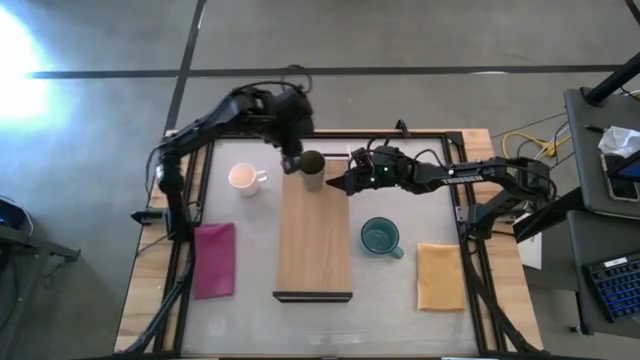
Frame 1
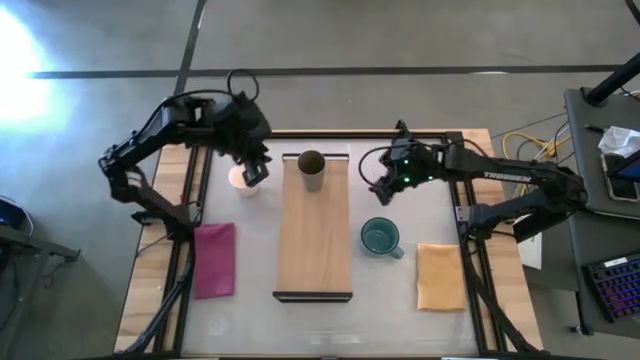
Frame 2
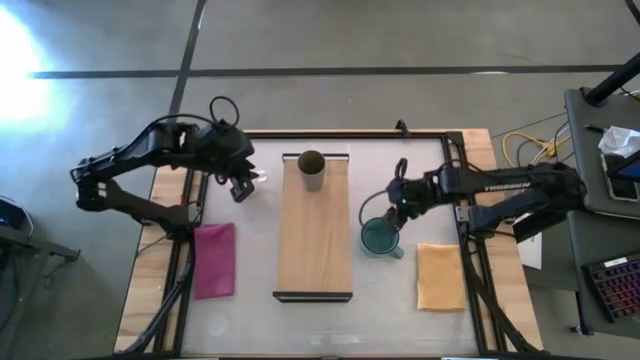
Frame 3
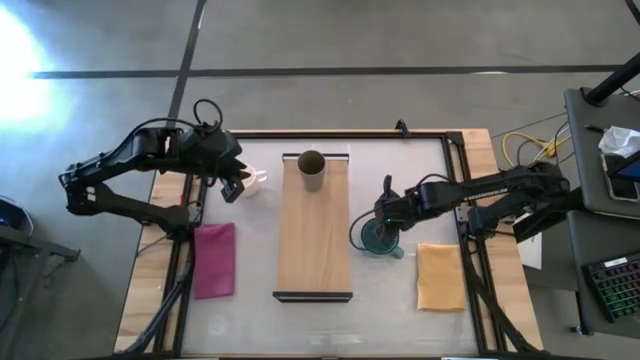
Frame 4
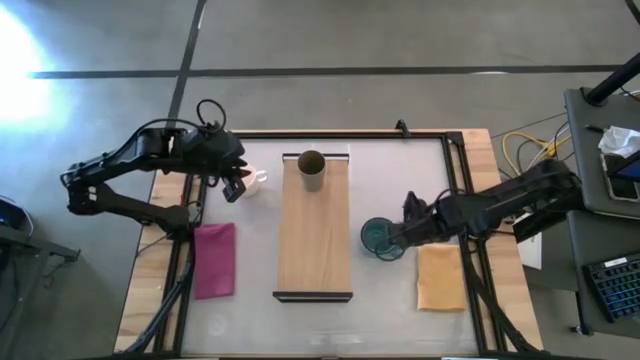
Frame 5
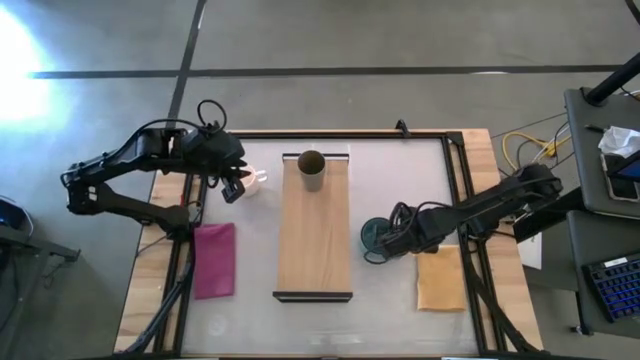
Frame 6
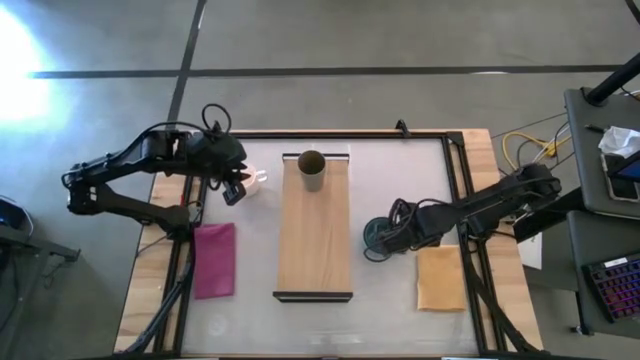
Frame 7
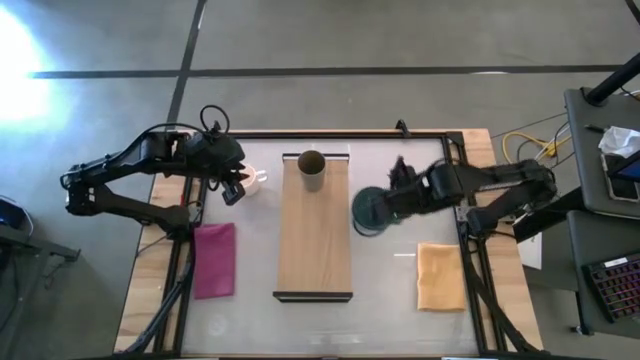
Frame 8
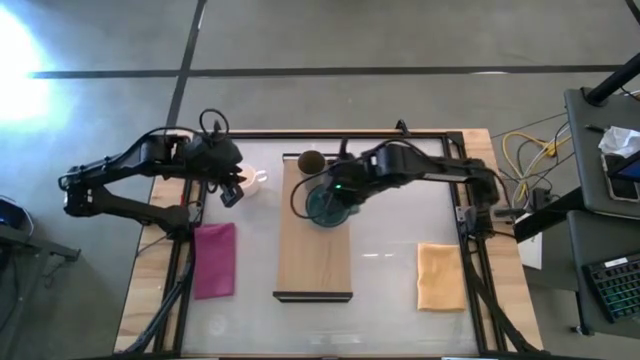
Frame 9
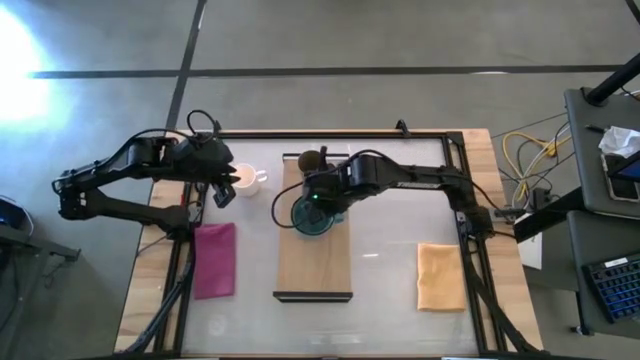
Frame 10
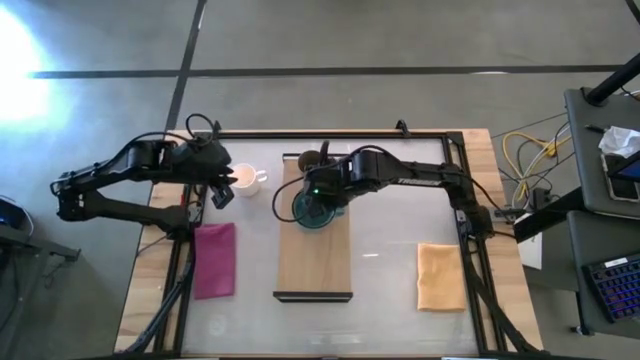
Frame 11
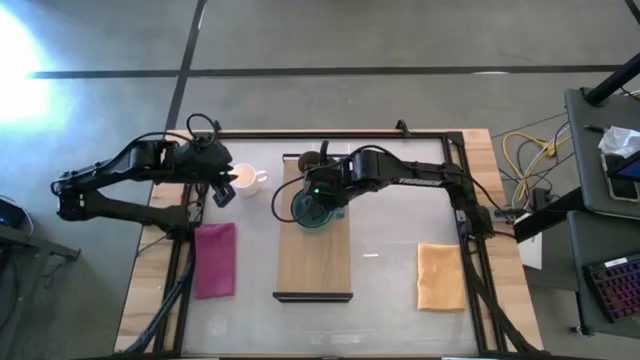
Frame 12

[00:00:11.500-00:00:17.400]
Task: Stack small to large cups/mugs on shelf
Put the blue mug on the shelf

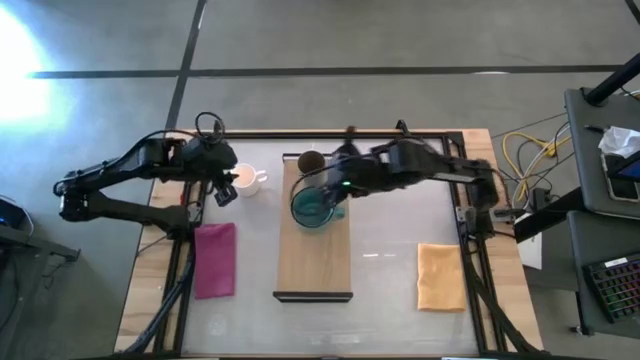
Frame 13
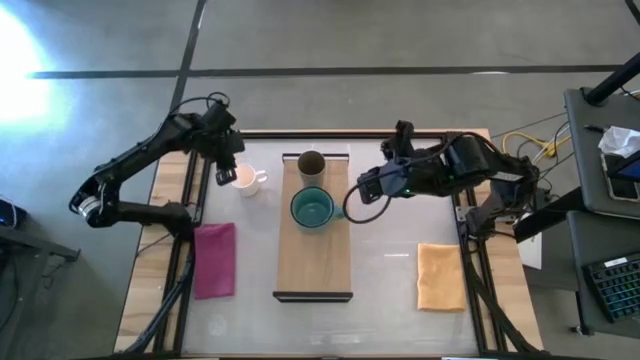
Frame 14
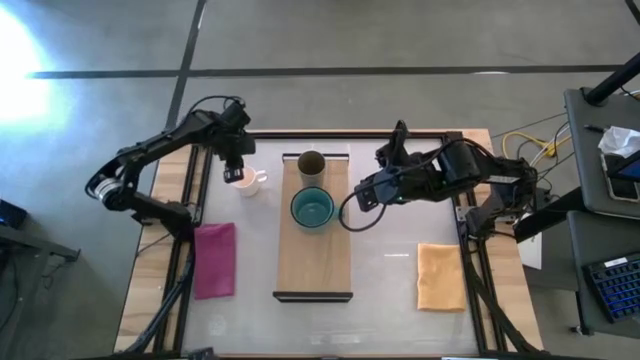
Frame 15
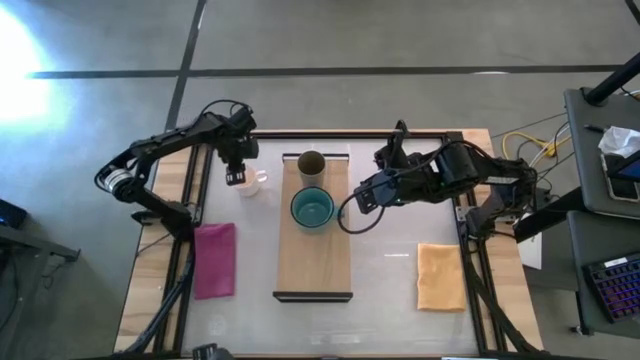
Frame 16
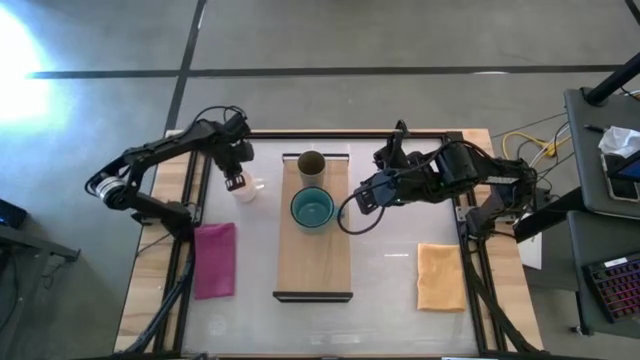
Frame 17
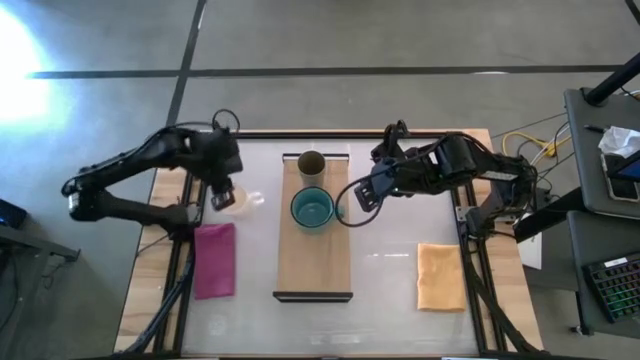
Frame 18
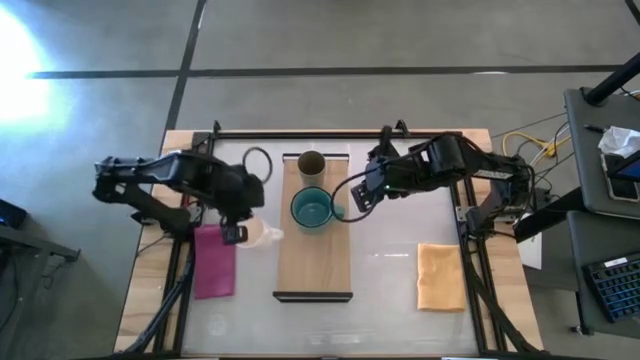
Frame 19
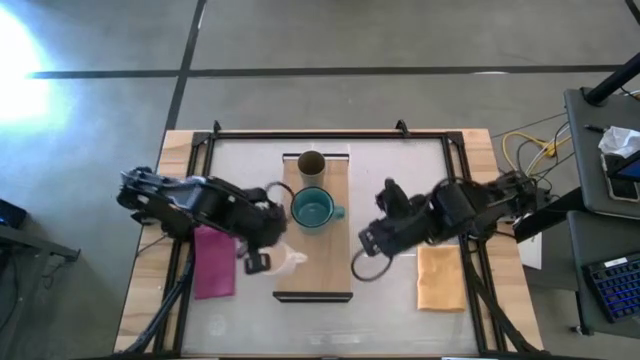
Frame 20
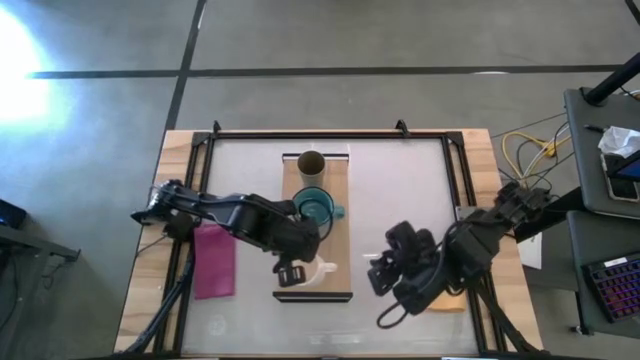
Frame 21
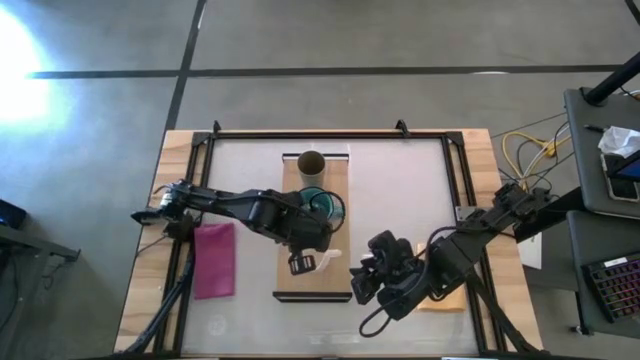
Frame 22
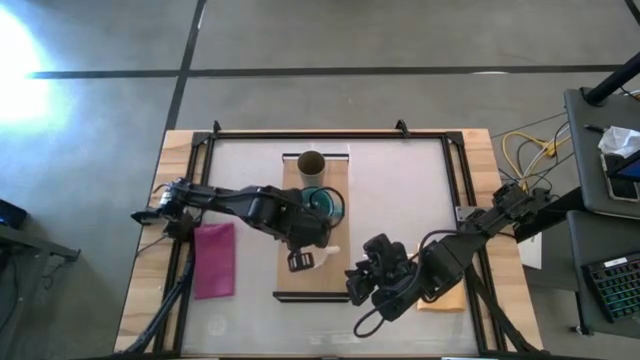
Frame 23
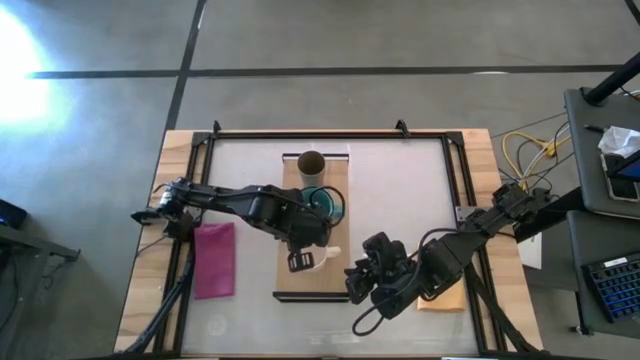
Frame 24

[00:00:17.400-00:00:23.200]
Put the white mug on the shelf

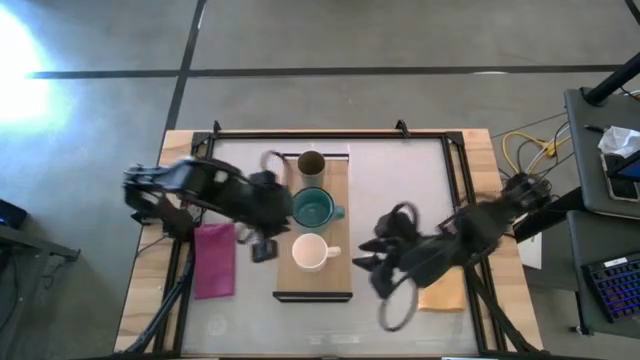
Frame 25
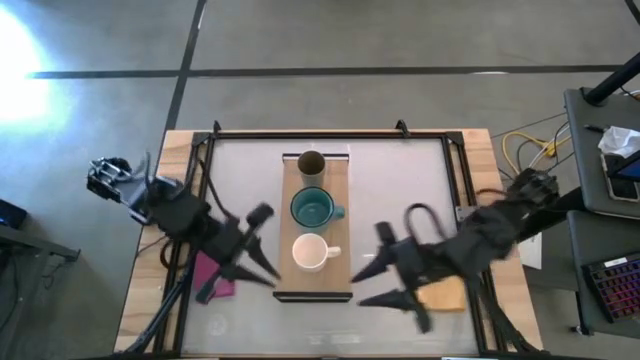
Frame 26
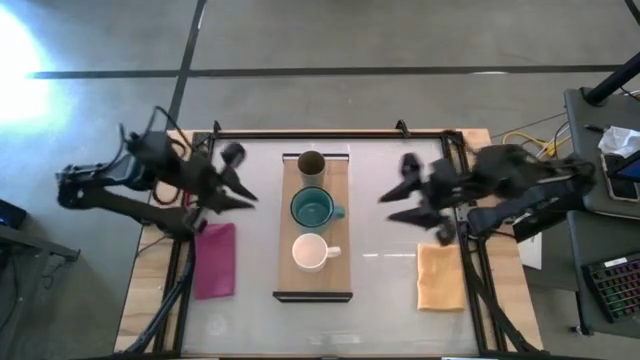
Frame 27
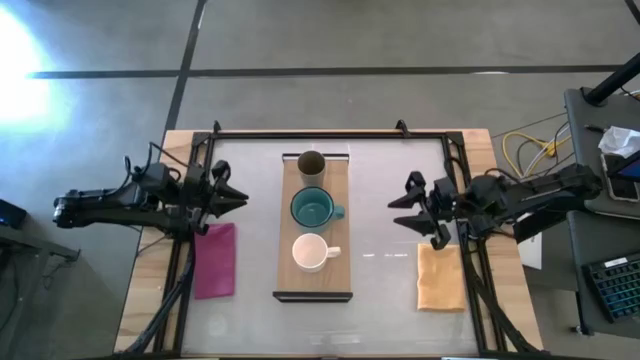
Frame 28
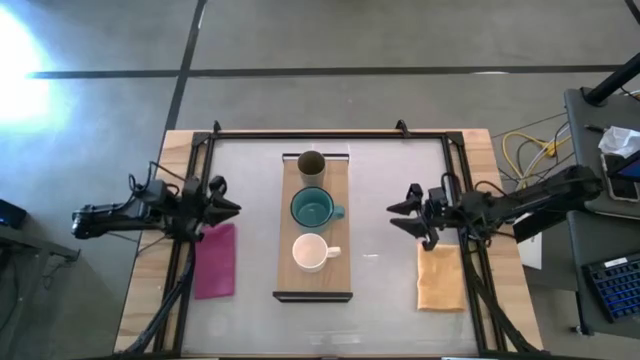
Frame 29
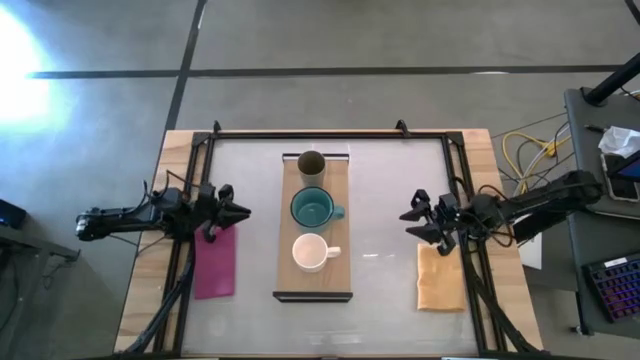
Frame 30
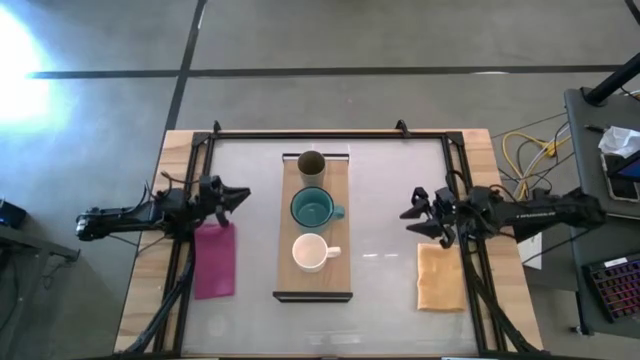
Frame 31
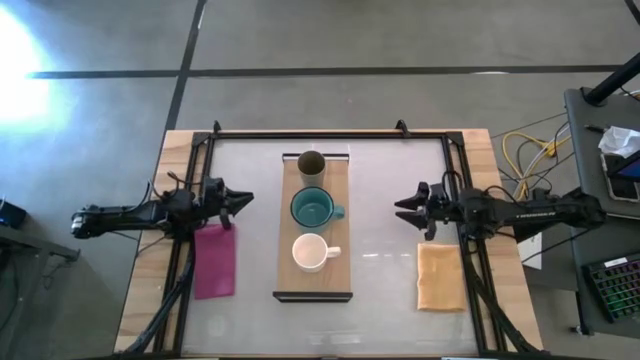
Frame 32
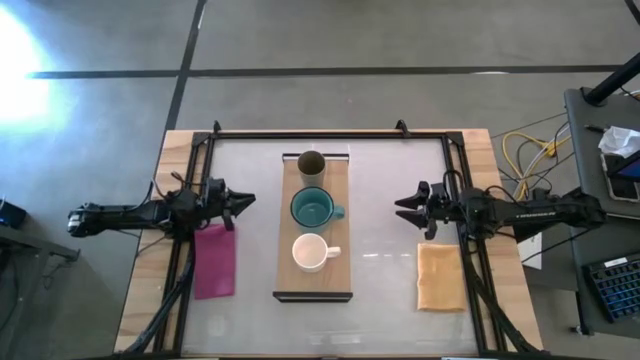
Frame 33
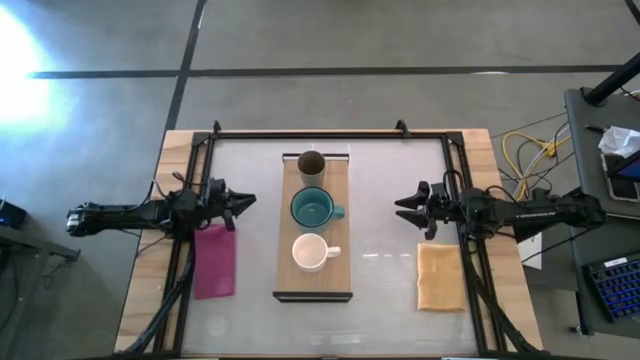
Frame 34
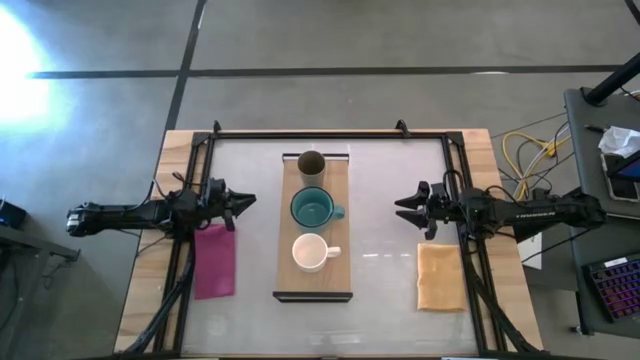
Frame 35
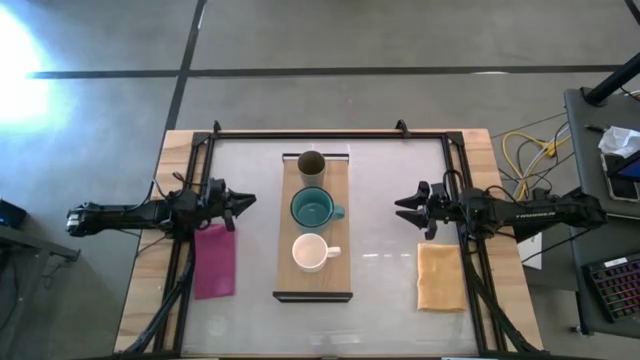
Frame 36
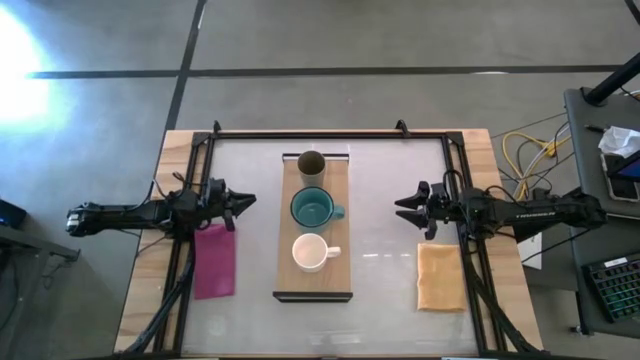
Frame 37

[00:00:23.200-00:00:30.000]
Return to Home Position

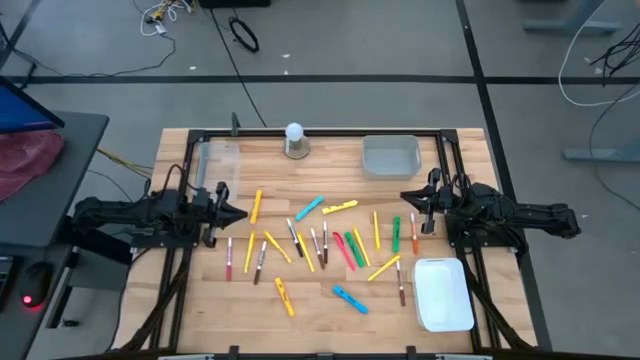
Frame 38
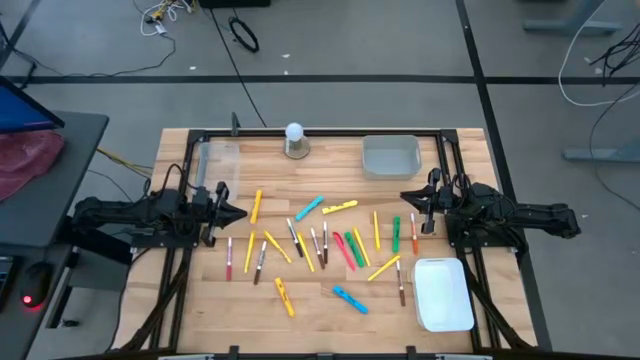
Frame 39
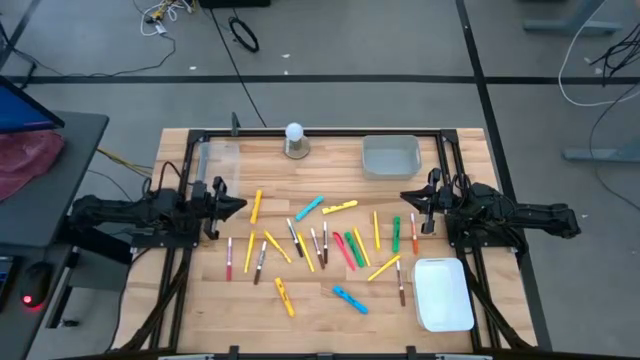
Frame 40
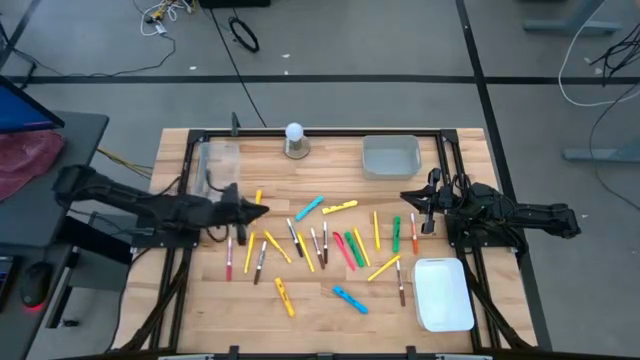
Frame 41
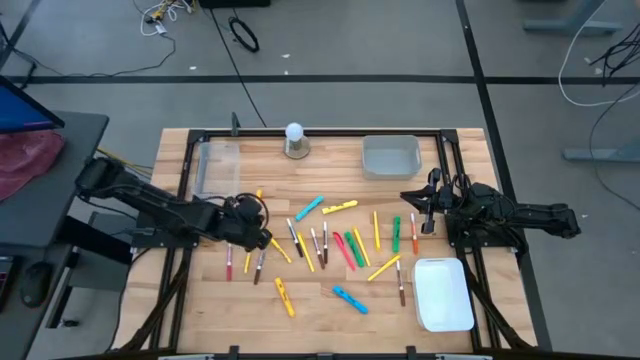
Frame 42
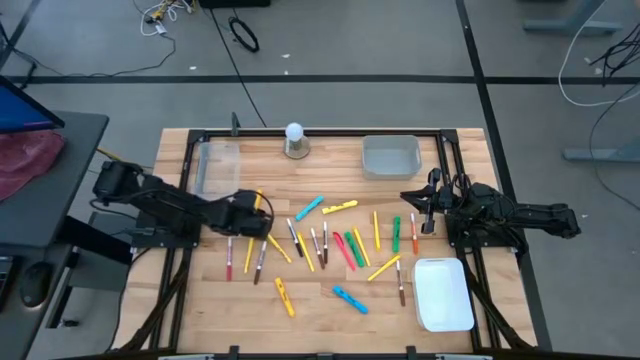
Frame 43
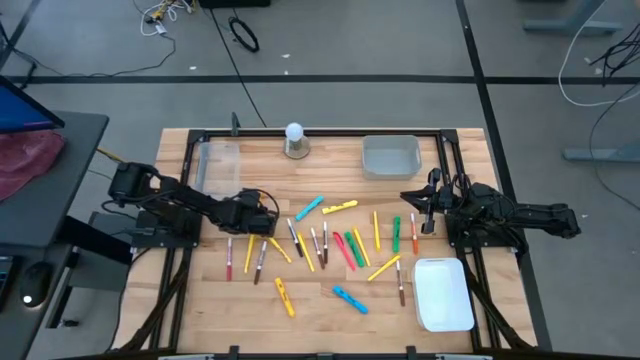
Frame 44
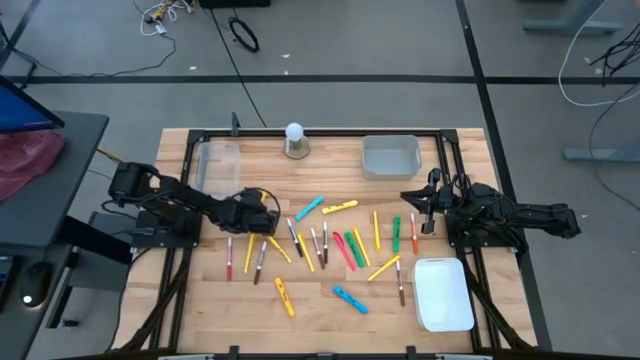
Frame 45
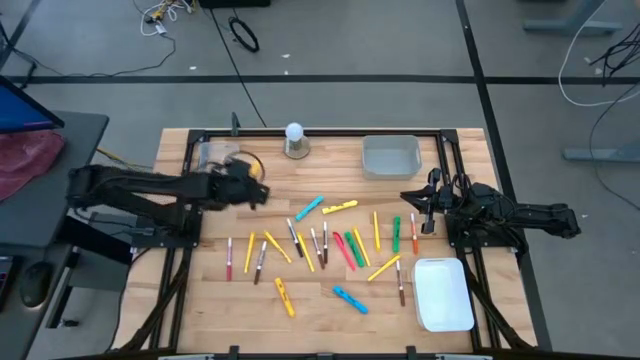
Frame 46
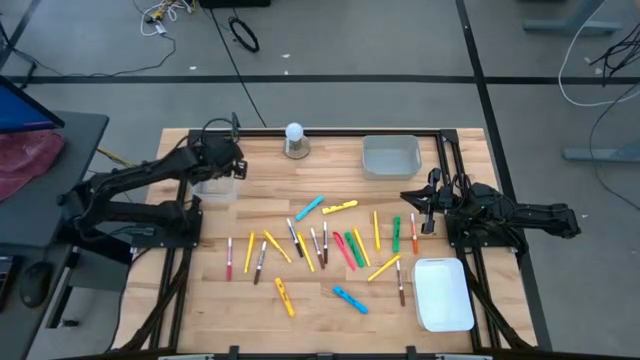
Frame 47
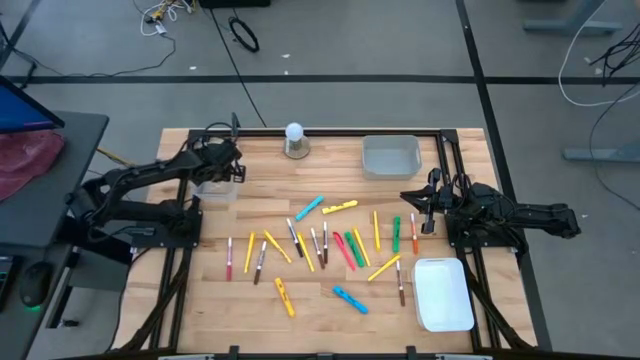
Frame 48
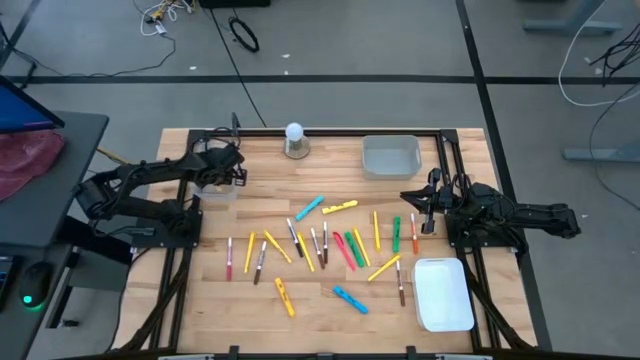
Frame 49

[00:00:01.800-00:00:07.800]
Task: Pick & Place Markers
Put the yellow highlighter into the transparent bin
